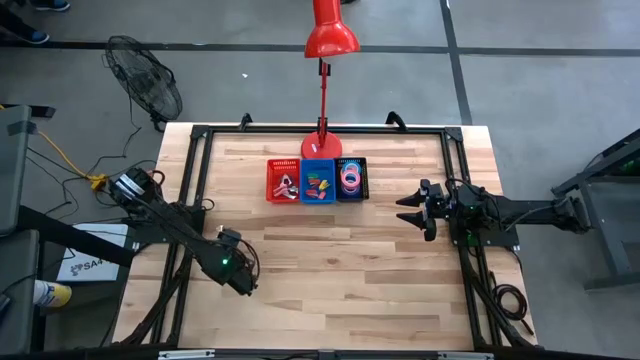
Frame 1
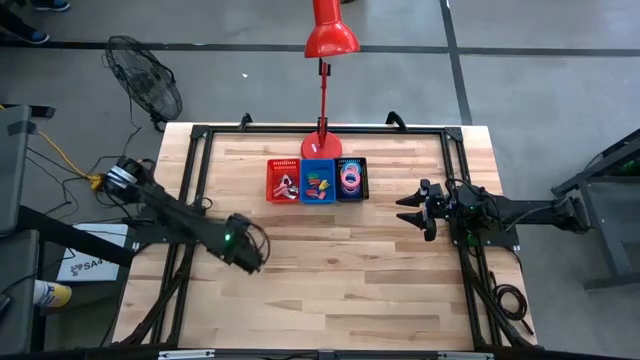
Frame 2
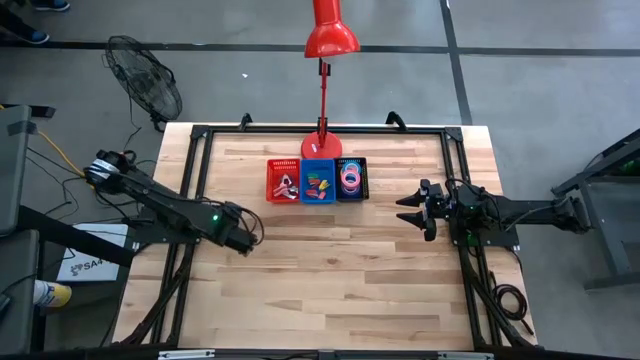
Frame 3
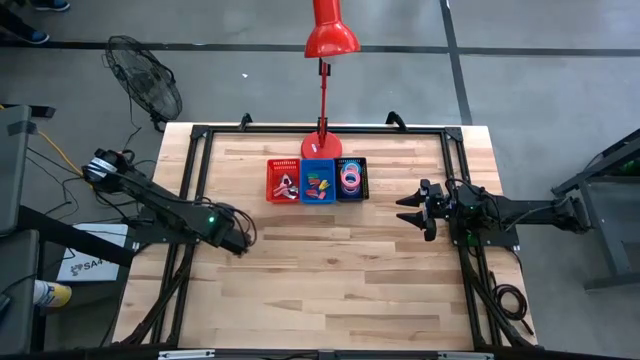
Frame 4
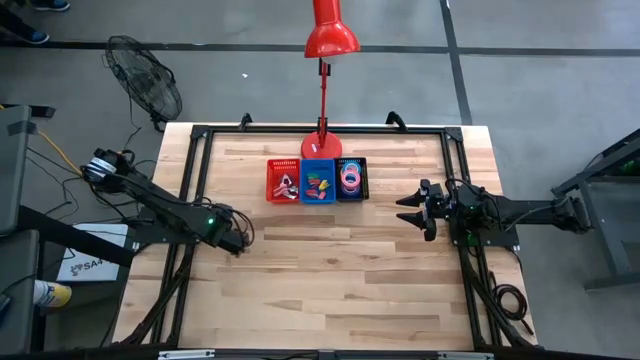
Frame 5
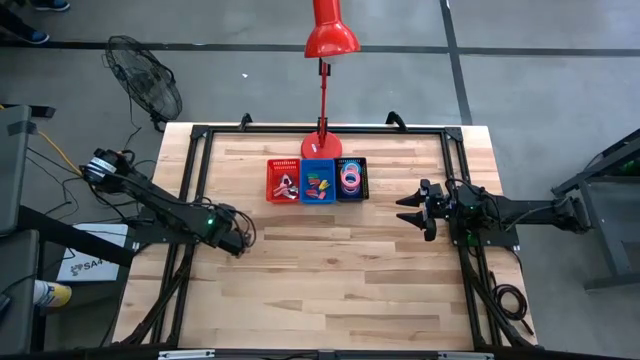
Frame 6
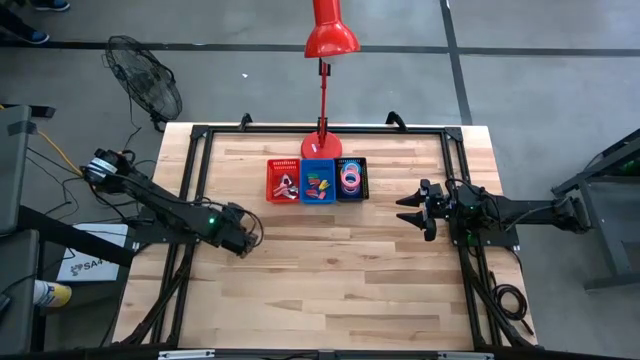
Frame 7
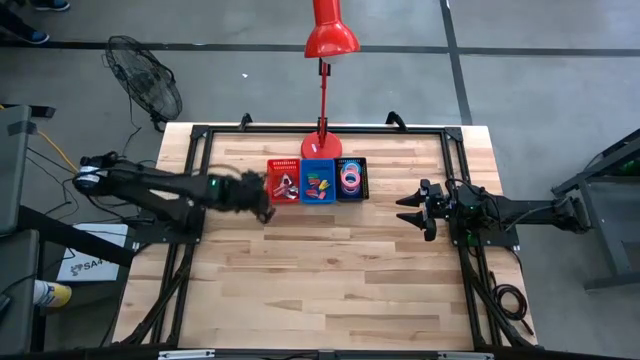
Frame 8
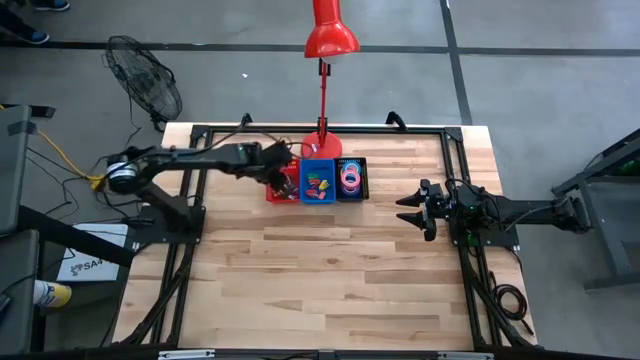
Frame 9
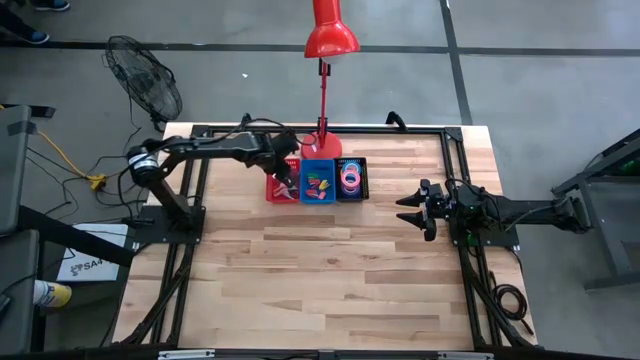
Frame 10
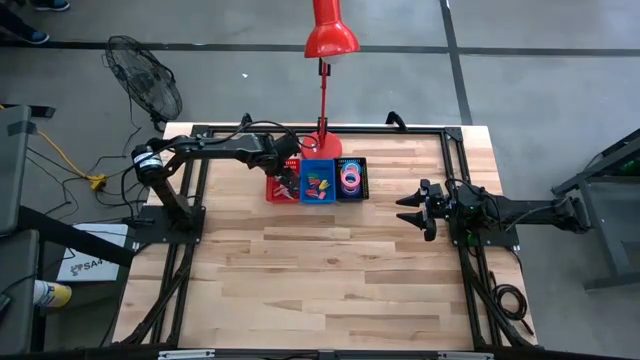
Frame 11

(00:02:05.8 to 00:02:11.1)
Task: Pick and place Stapler, Stapler remover, tape
Put the gray staple remover into the red basket

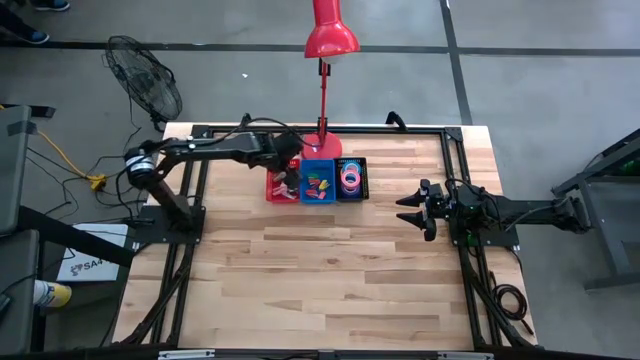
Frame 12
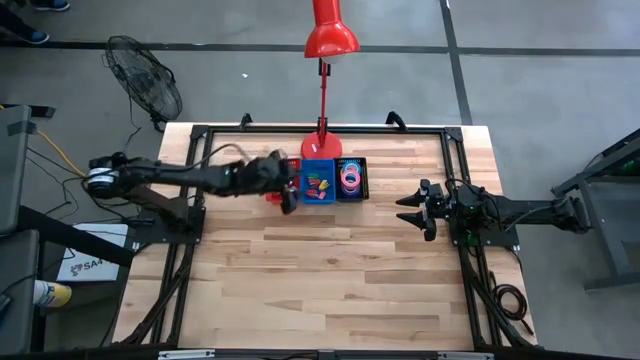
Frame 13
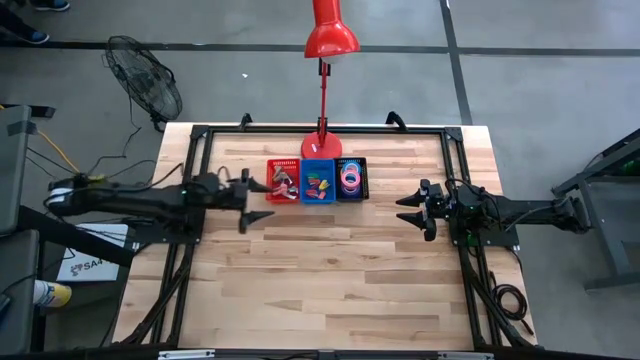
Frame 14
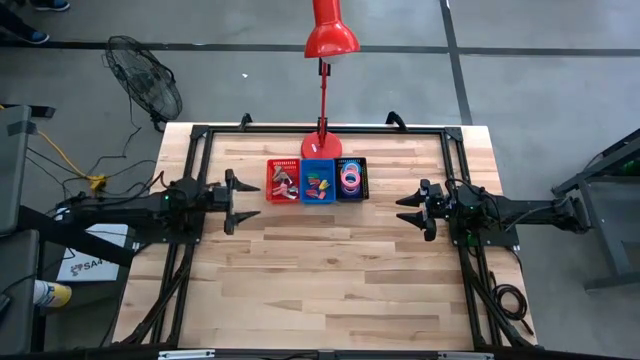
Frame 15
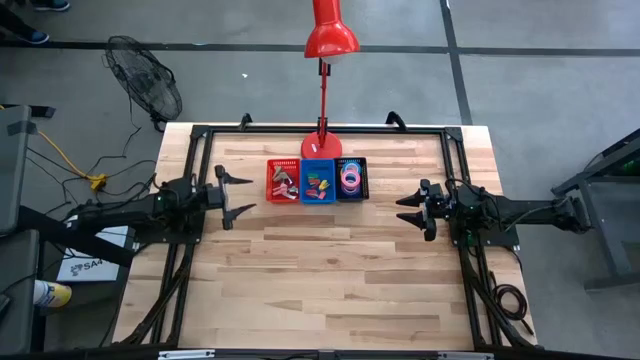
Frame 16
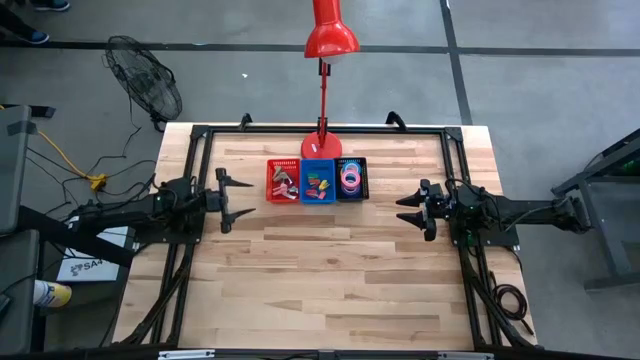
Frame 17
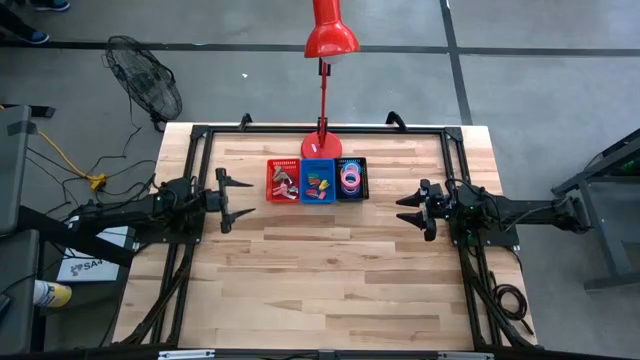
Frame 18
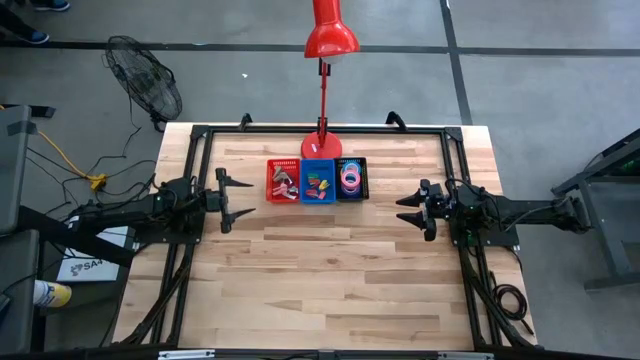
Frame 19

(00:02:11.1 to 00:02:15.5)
Return to Home Position

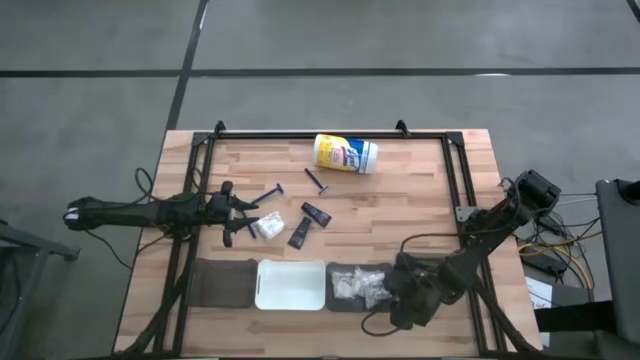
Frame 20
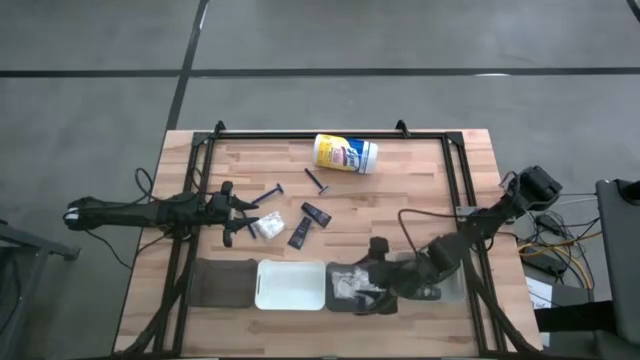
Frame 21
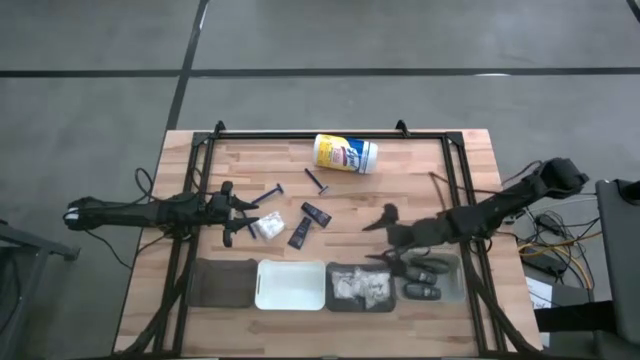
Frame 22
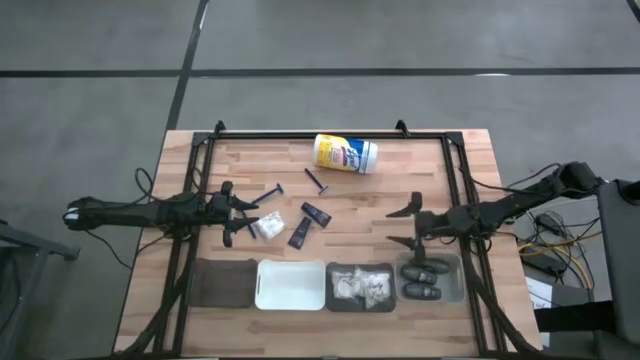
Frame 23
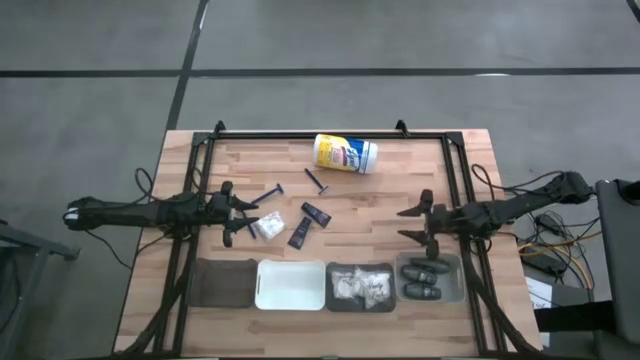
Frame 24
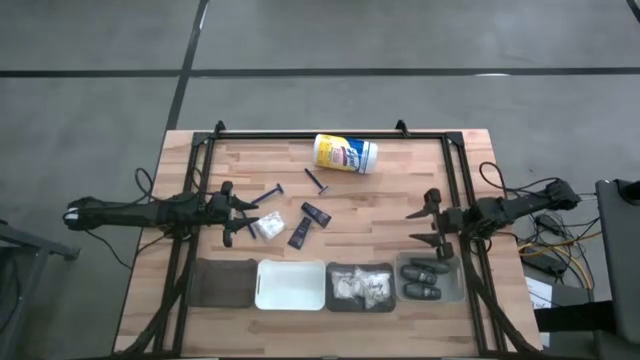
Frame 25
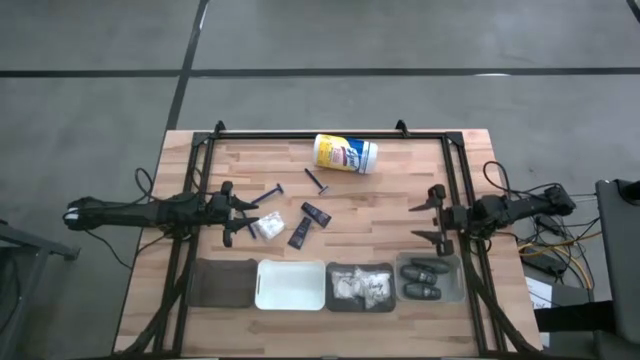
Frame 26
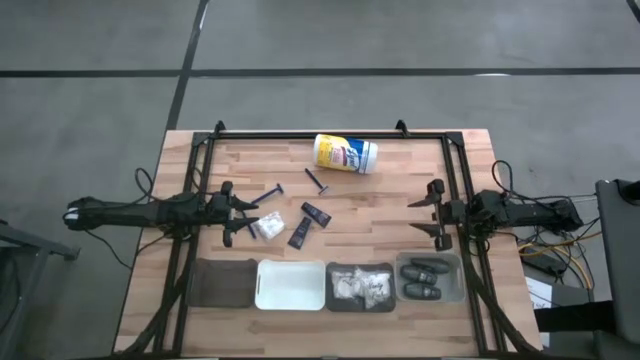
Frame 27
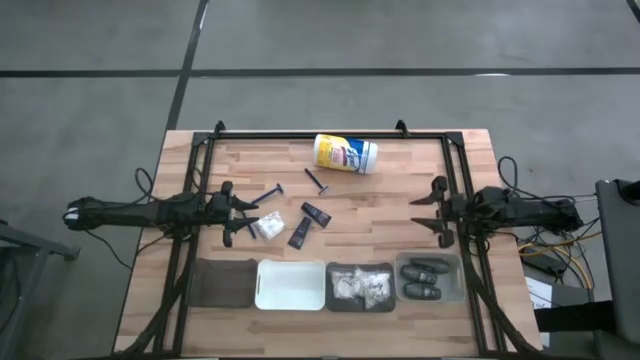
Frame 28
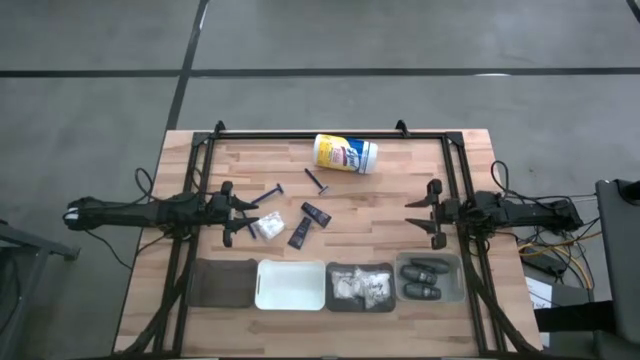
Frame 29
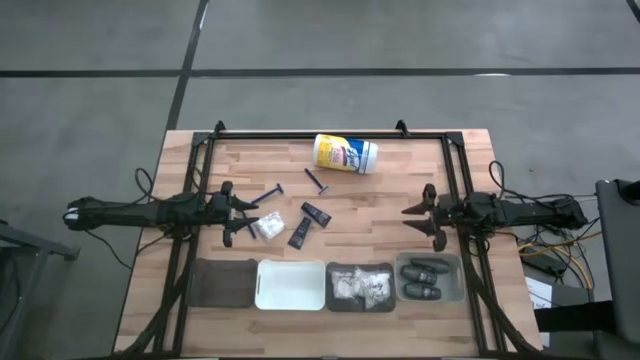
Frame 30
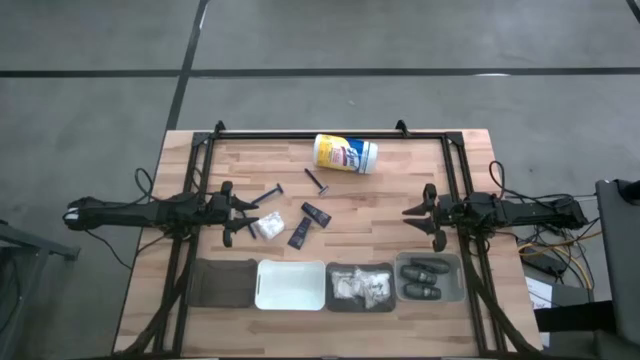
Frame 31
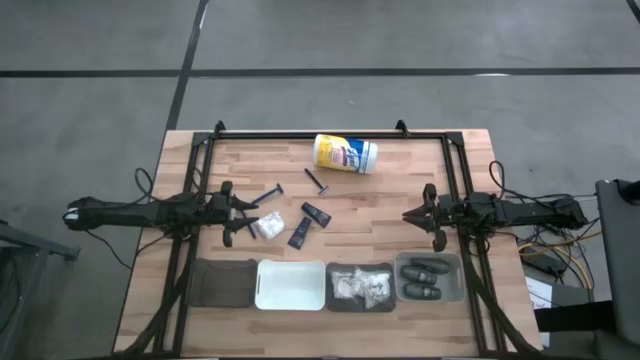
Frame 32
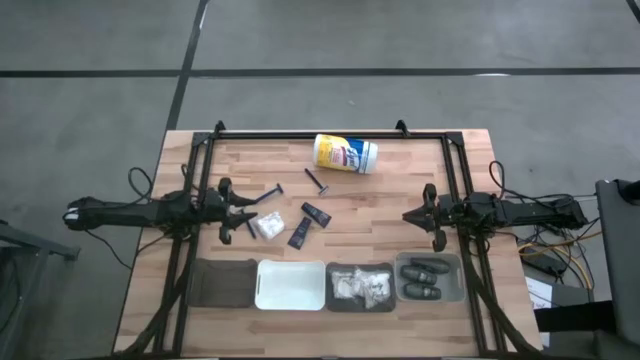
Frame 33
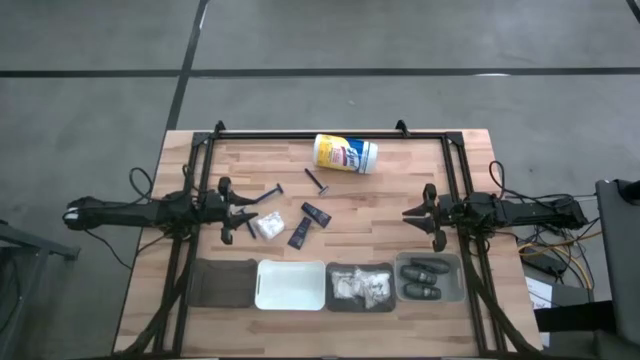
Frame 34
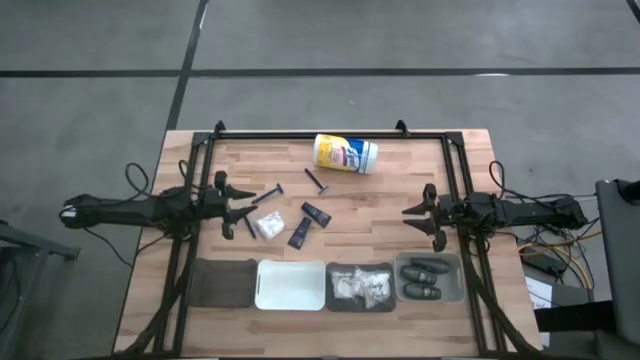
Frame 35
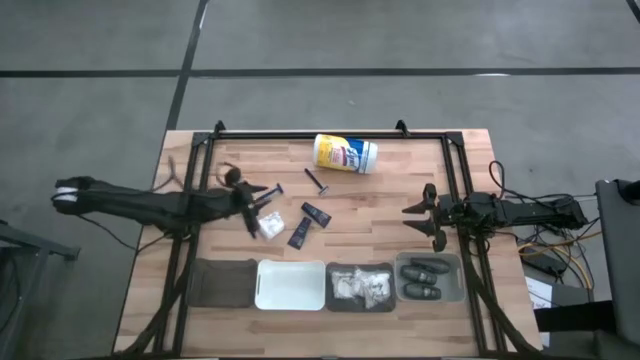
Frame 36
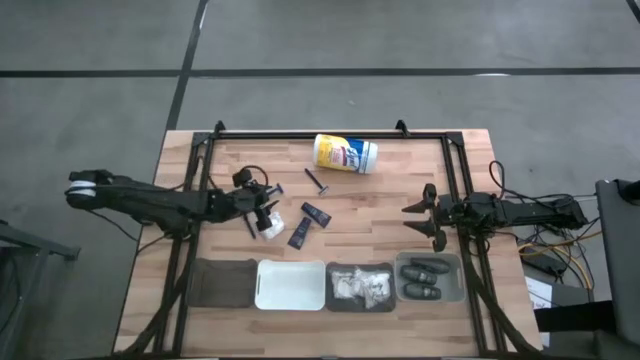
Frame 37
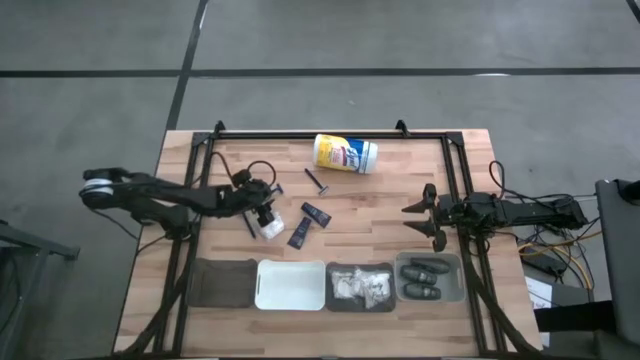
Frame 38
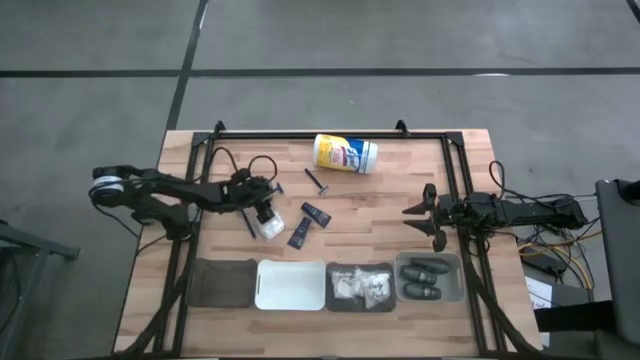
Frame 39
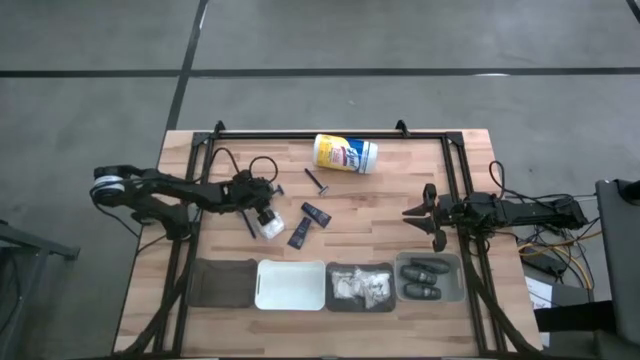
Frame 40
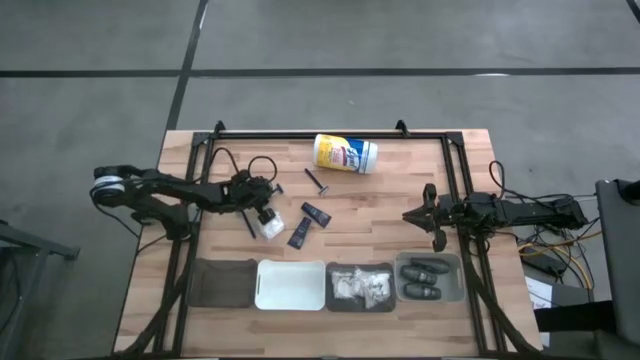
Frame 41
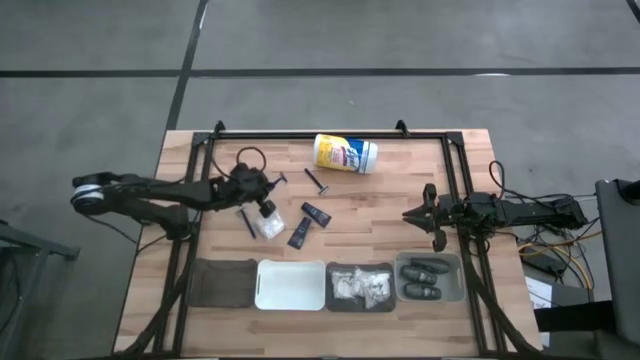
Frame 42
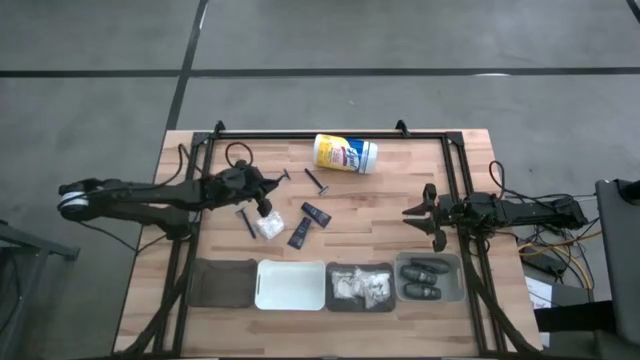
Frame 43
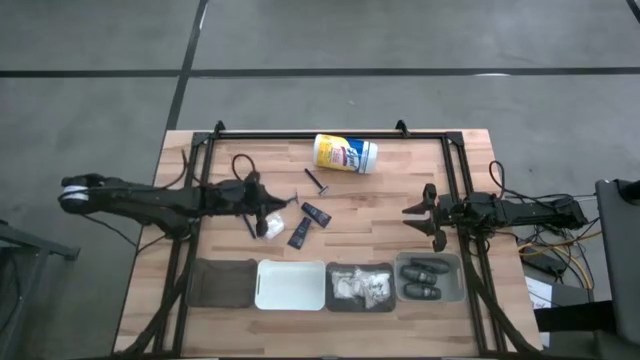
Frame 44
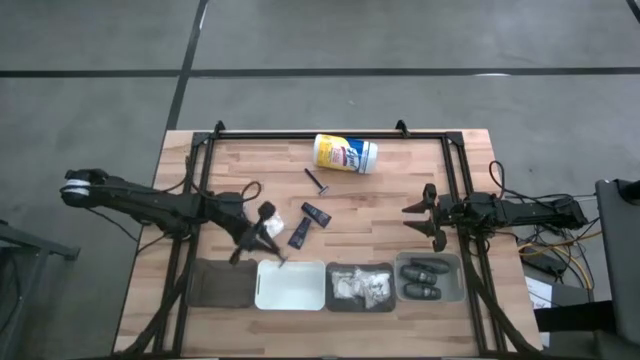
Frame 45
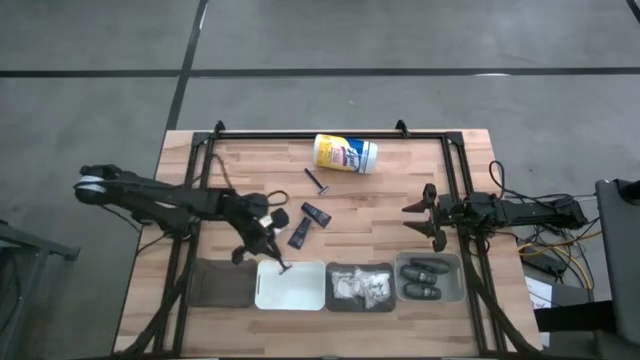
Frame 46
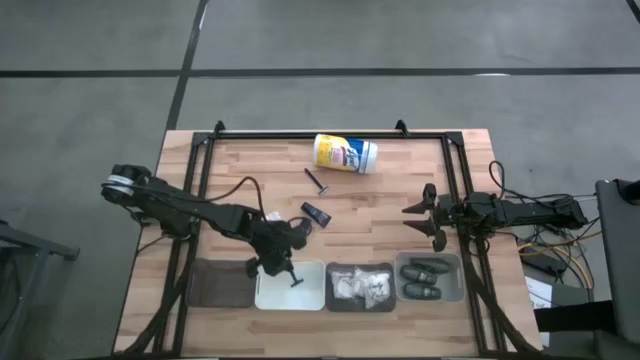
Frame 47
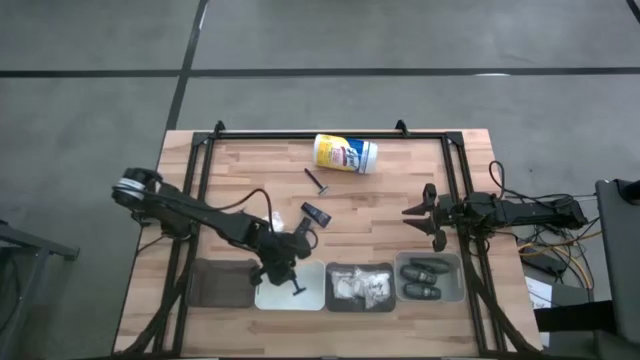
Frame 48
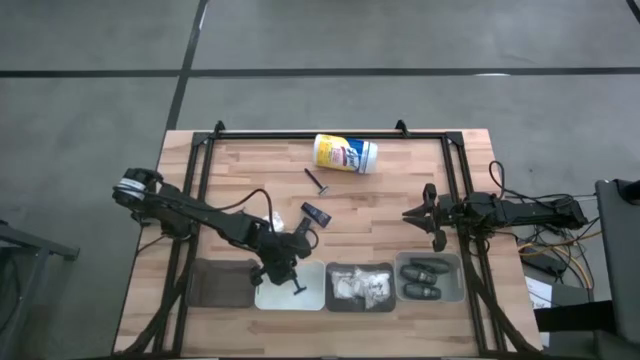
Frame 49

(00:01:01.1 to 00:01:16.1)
Task: Pick & Place Travel size toiletries
Put the blue razor into the white bin
